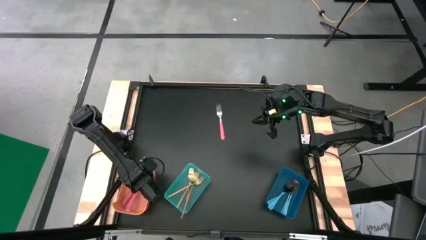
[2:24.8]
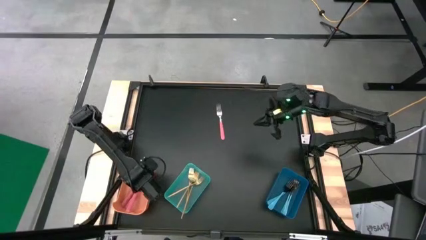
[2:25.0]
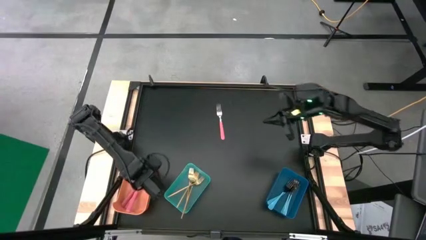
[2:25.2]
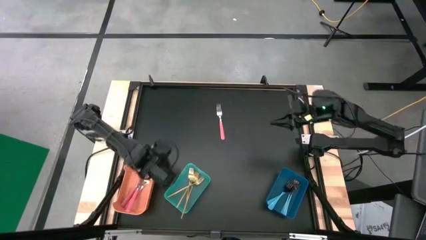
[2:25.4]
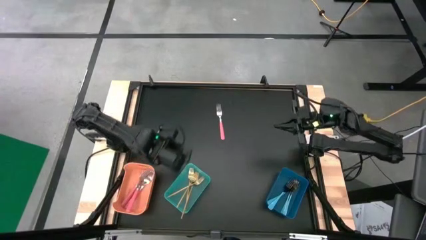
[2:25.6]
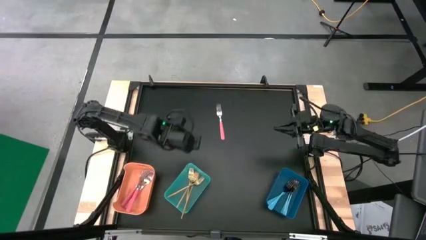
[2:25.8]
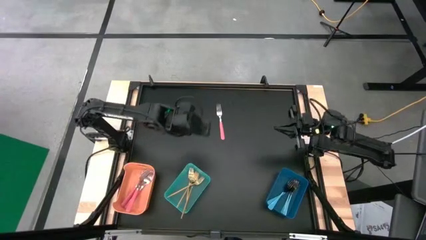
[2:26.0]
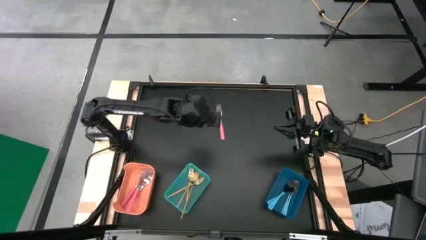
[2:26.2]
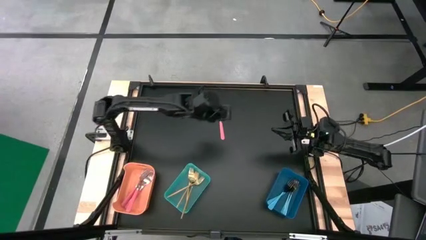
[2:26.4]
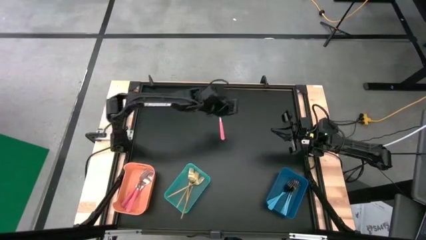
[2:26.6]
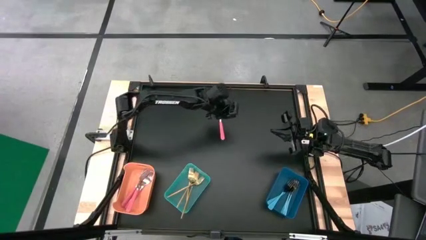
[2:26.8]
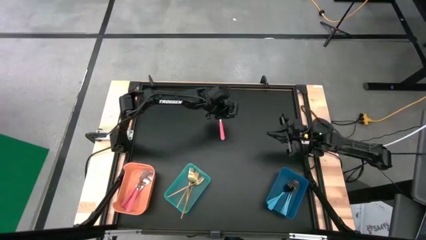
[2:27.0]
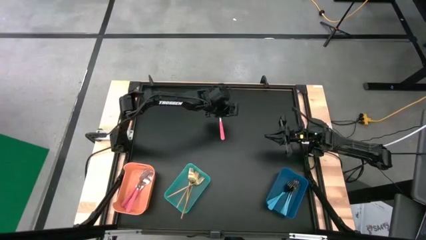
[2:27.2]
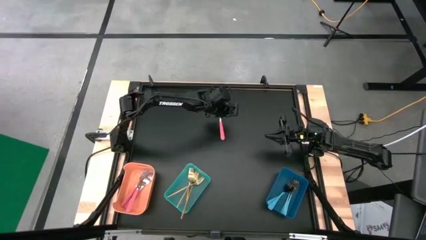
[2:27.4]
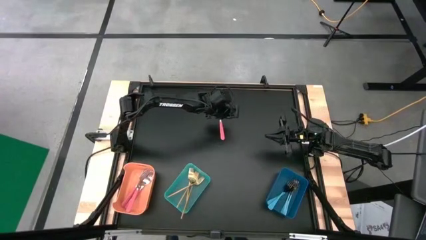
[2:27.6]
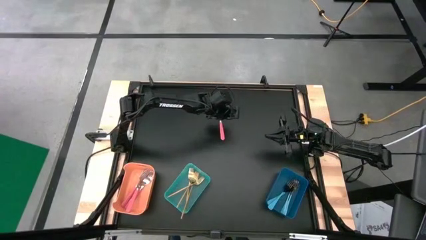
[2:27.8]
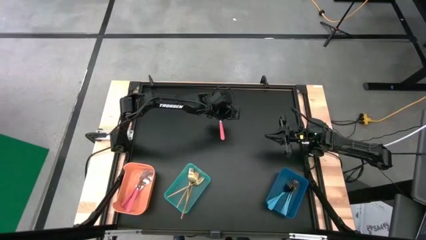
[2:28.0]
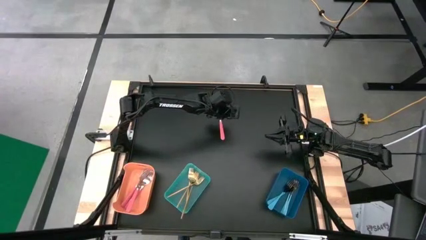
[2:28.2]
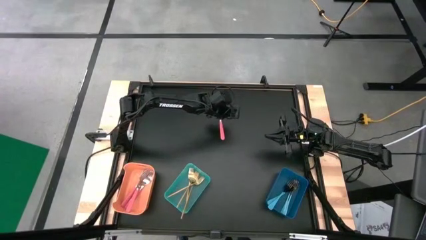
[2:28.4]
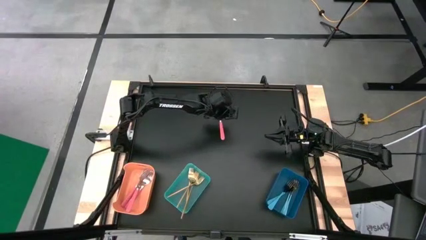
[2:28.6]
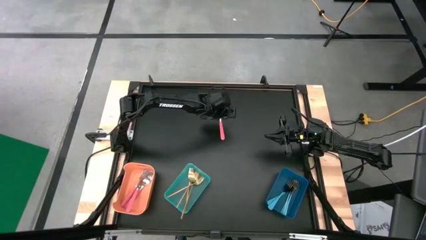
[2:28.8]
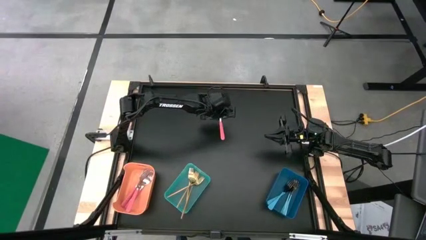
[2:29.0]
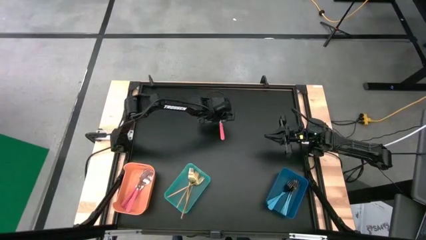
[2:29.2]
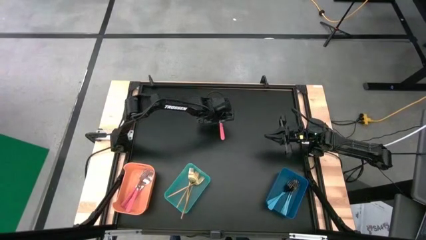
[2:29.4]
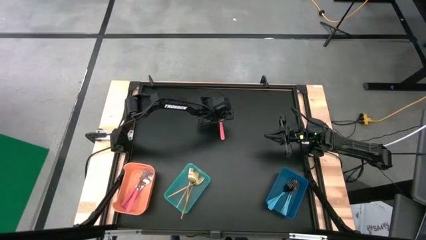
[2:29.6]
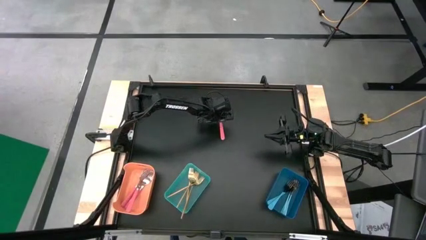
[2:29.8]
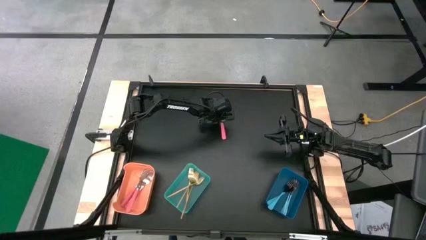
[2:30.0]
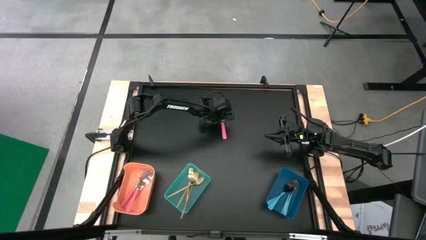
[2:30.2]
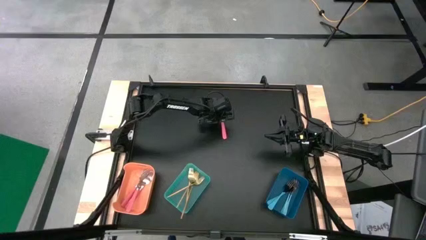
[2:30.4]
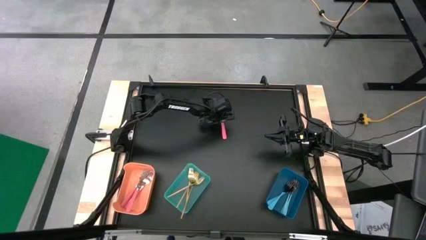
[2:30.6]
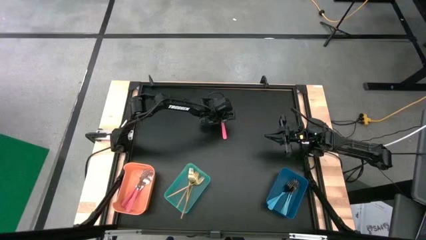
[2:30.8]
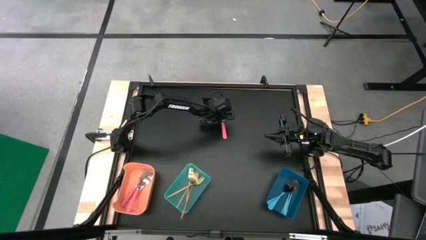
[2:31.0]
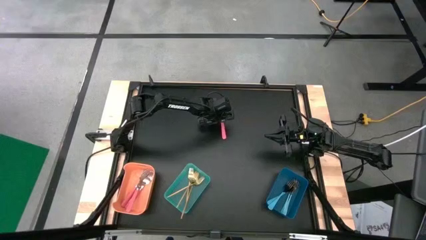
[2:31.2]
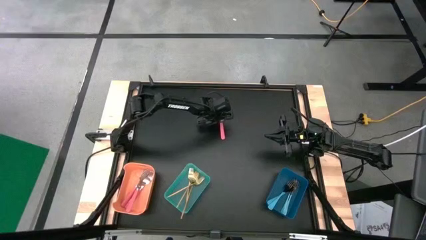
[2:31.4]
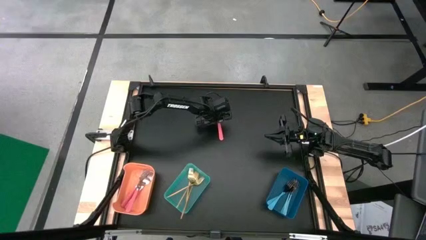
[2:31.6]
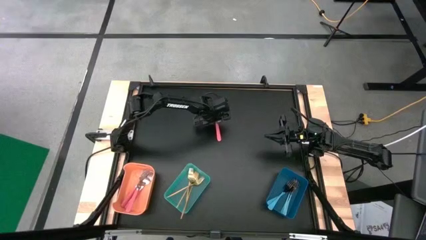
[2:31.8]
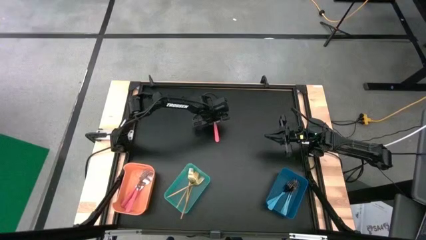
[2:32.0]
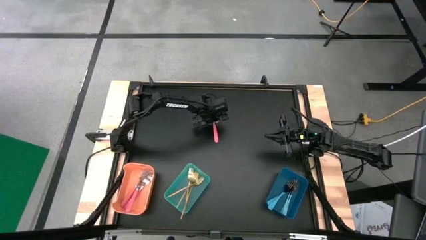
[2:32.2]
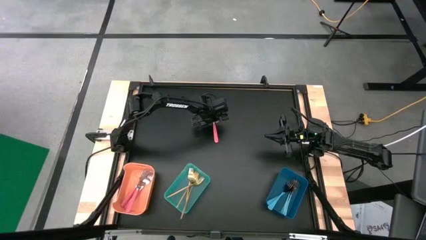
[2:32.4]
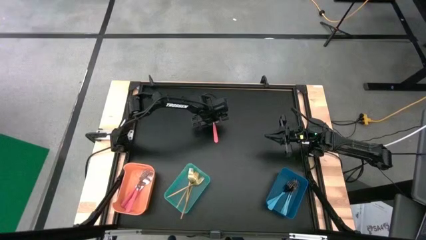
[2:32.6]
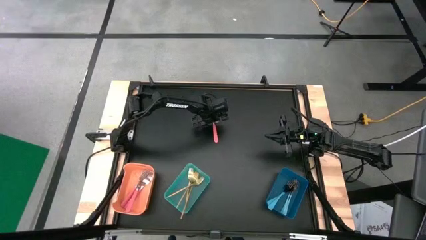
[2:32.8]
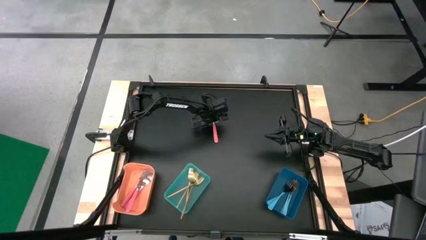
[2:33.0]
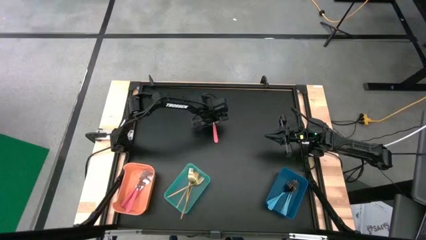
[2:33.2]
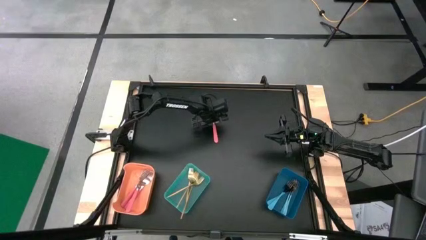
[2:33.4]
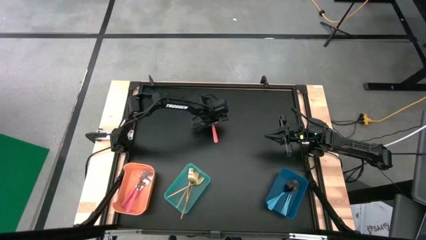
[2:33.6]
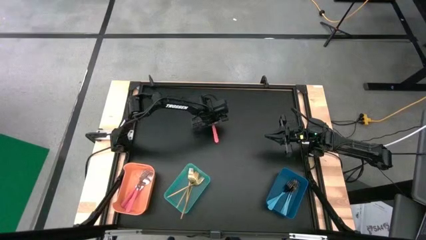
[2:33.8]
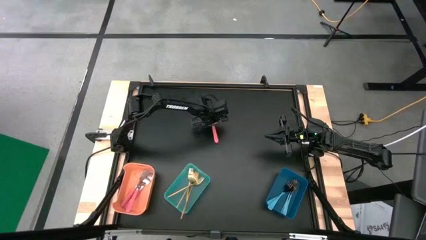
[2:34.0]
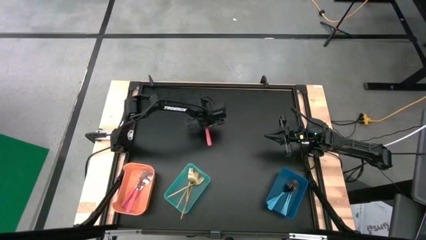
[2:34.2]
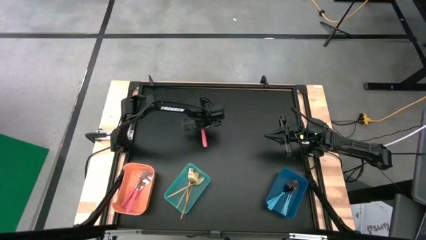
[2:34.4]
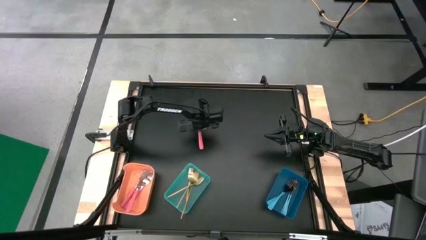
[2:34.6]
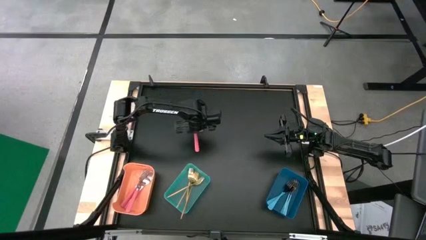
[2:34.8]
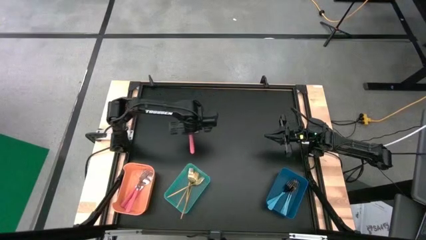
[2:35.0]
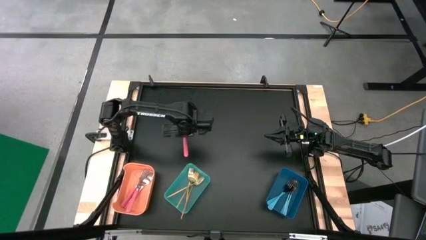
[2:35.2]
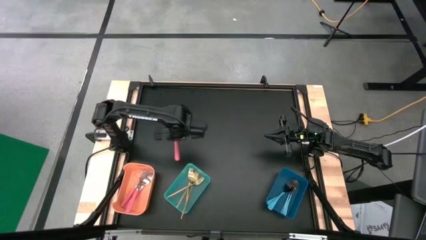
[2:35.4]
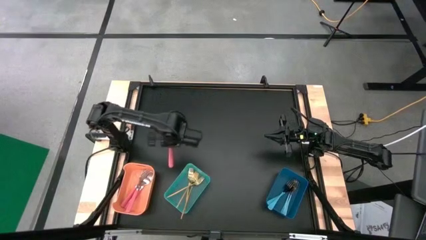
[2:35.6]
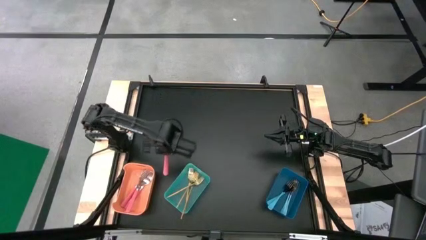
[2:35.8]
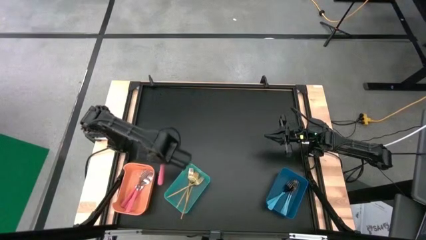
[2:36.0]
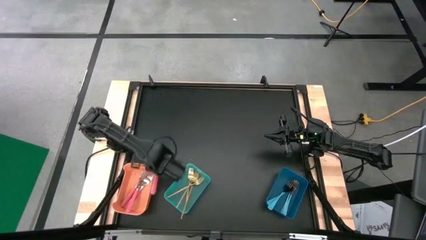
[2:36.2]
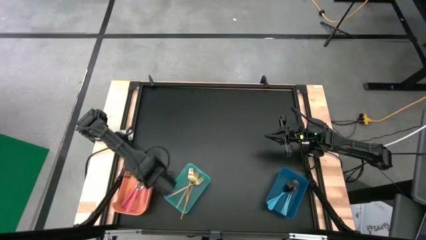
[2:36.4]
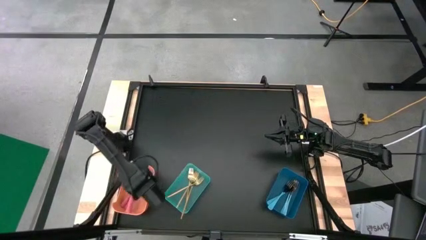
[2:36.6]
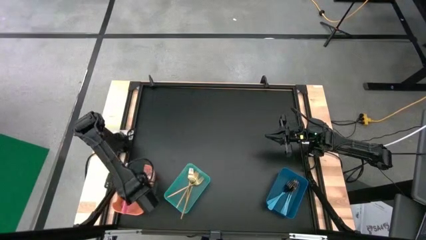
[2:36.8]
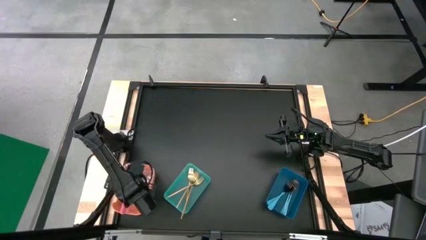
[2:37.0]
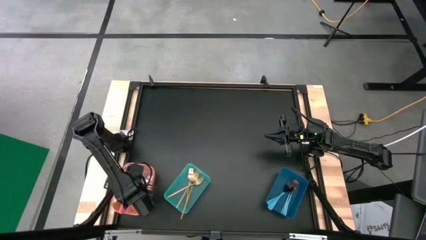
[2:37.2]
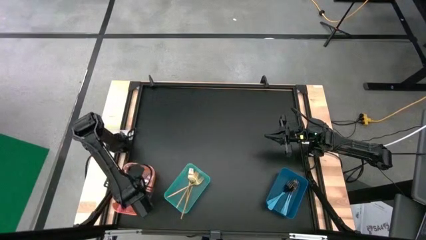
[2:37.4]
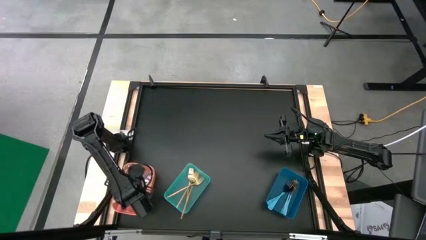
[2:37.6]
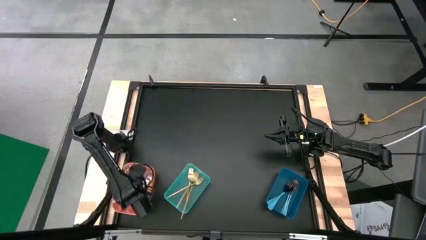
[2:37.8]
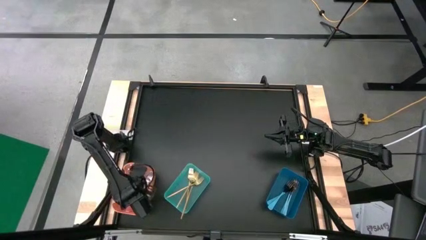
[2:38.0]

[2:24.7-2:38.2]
Task: Sort silverware by color (type)
Put the pink fork into the orange bin

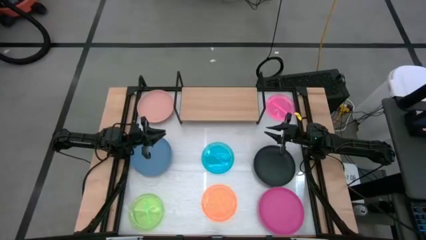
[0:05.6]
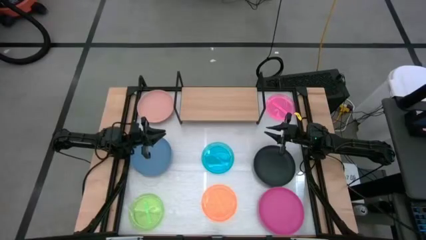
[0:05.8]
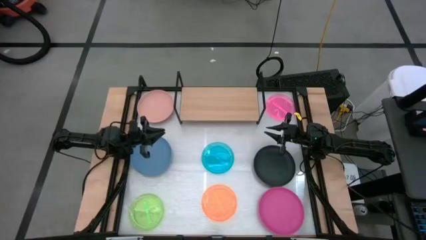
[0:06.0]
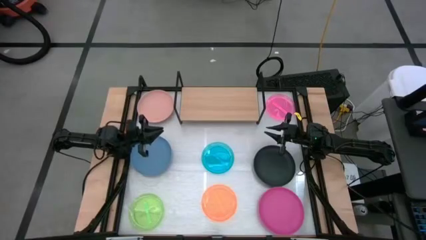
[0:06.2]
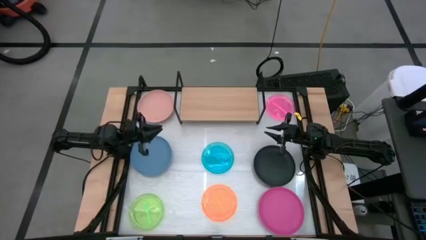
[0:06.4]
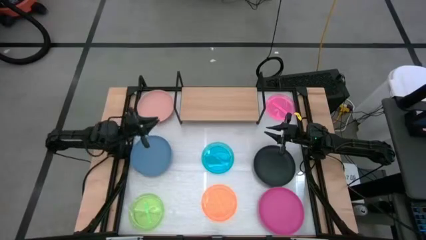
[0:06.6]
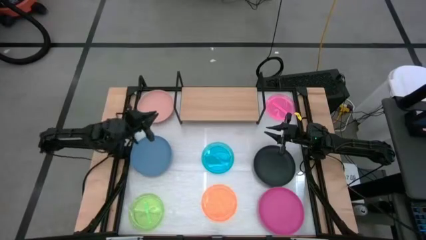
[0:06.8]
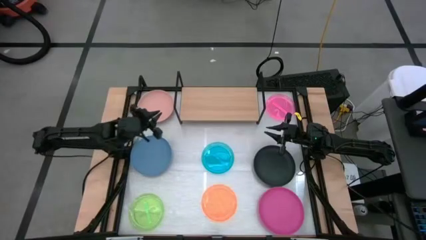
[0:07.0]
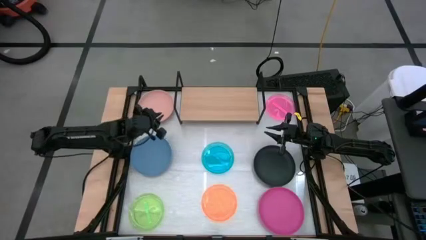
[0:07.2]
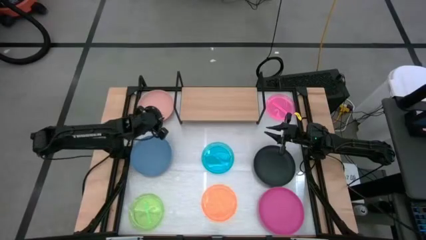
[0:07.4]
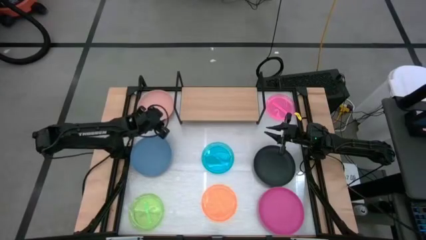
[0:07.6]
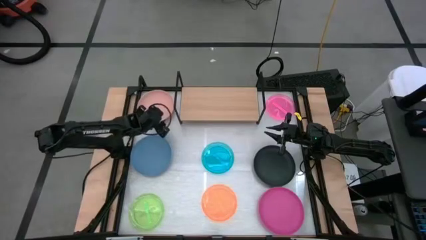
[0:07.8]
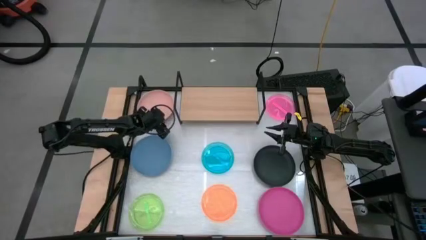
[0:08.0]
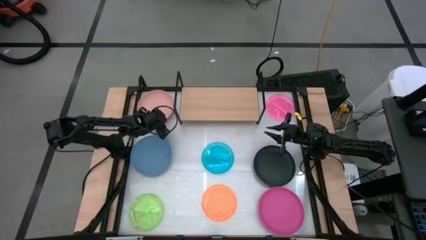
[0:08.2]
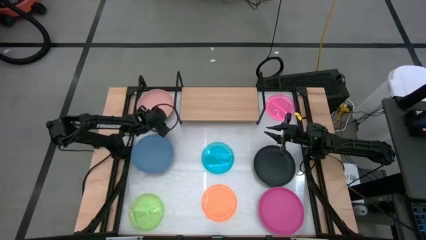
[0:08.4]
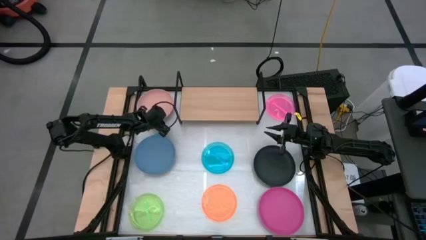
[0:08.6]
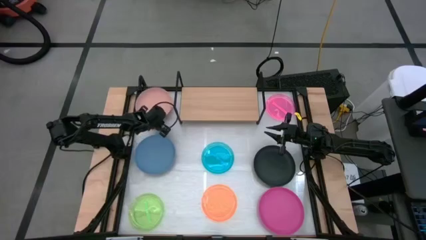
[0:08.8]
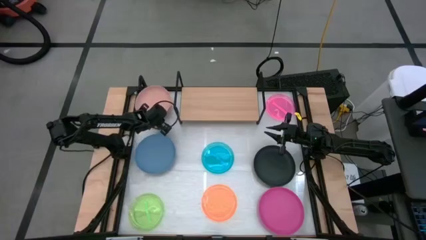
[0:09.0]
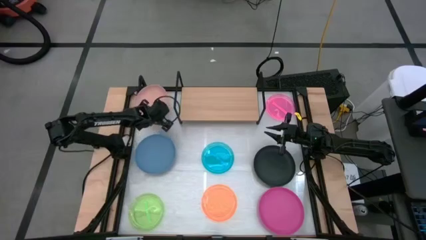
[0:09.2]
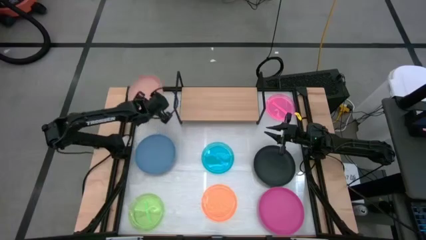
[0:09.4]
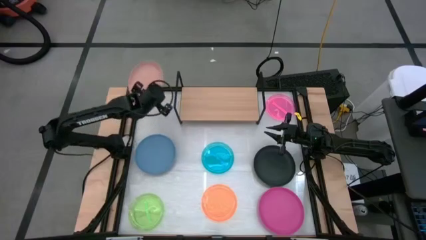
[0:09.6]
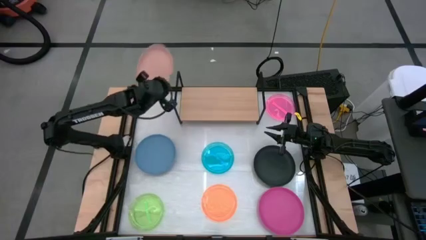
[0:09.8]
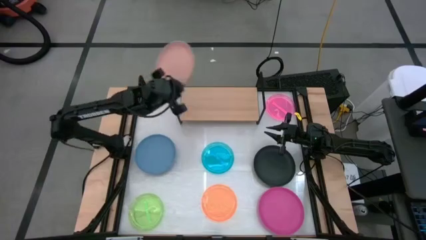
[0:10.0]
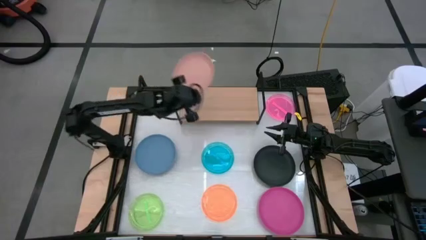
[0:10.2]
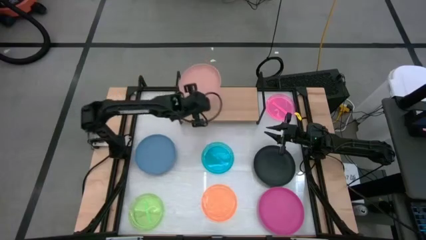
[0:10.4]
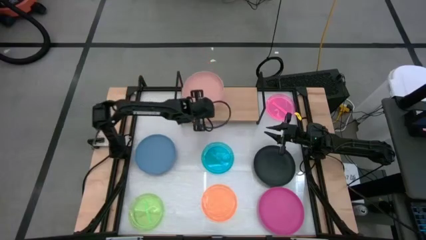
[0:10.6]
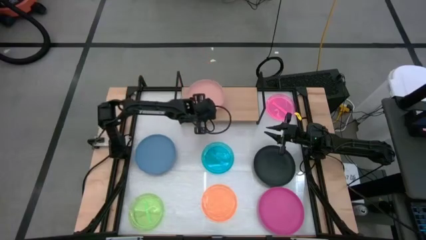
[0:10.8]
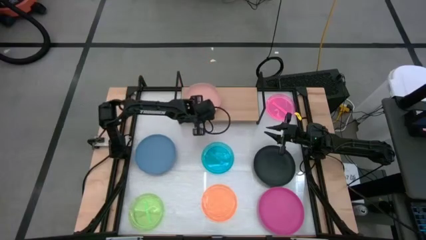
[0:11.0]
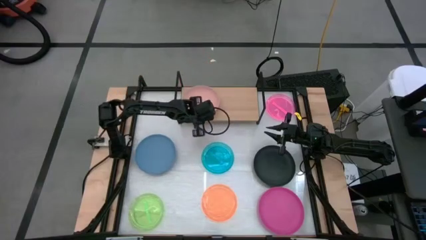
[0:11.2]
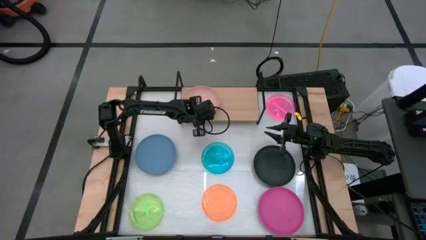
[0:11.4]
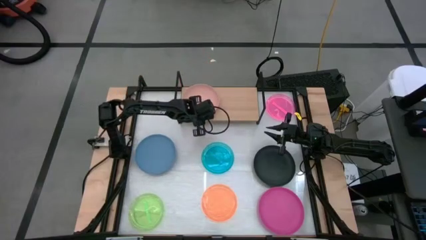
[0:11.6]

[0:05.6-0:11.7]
Task: Place and stack plates onto a shelf
Put the light orange plate on the shelf
